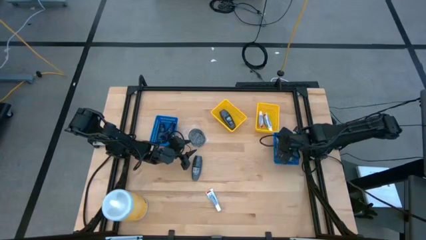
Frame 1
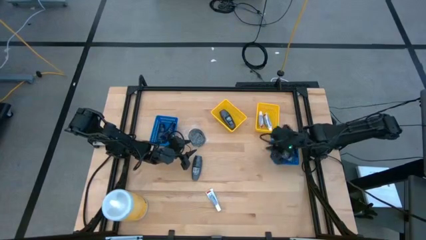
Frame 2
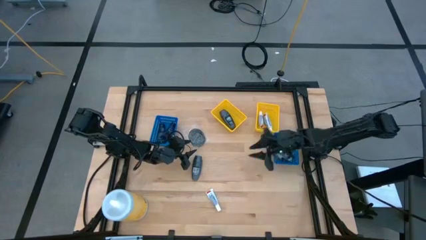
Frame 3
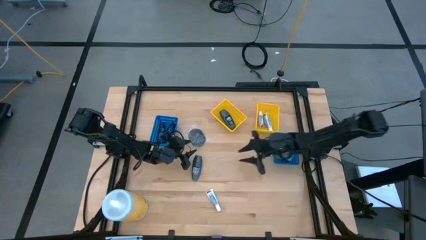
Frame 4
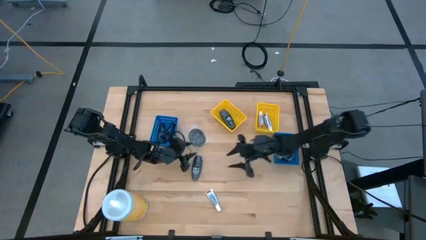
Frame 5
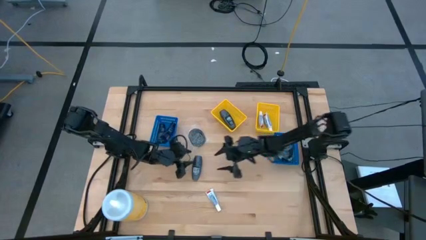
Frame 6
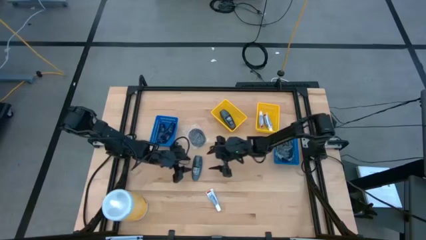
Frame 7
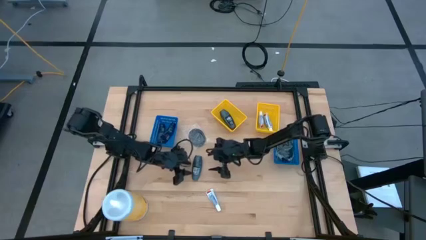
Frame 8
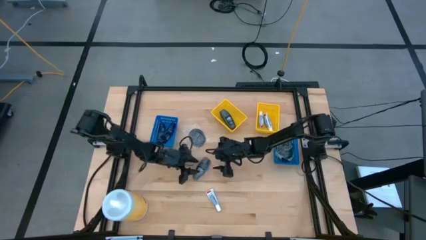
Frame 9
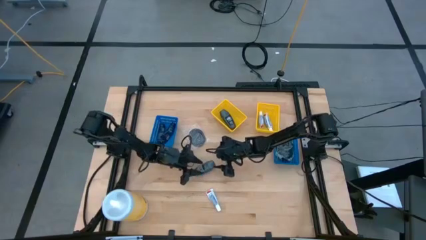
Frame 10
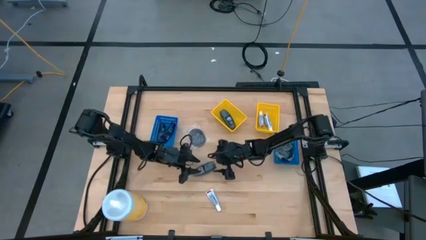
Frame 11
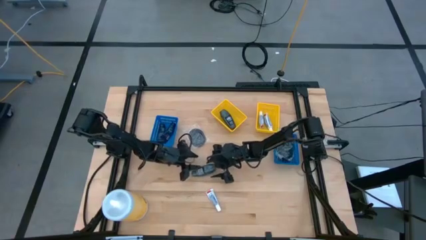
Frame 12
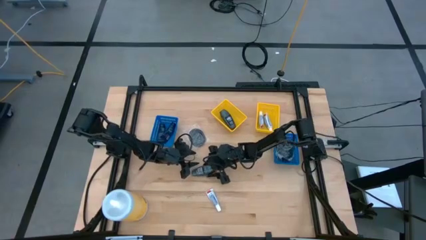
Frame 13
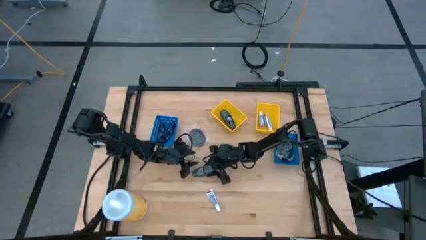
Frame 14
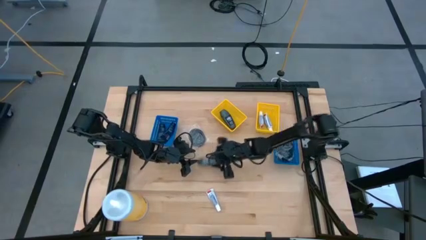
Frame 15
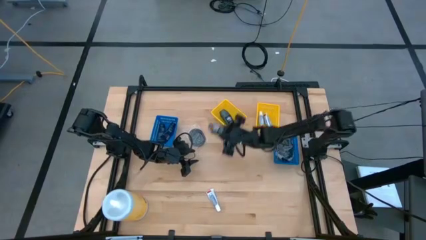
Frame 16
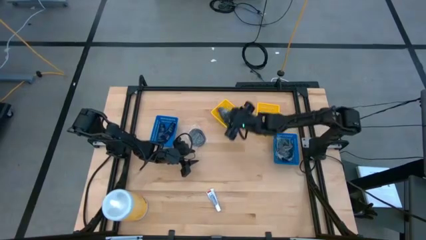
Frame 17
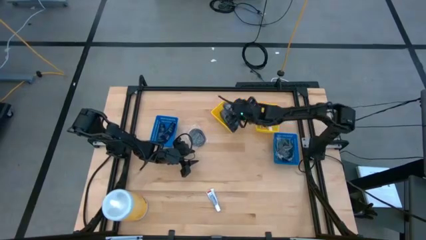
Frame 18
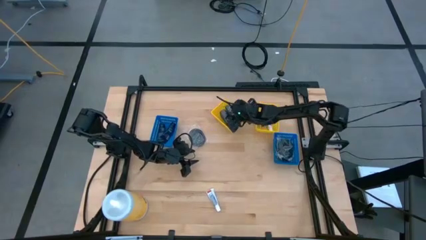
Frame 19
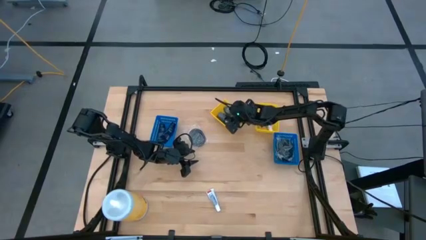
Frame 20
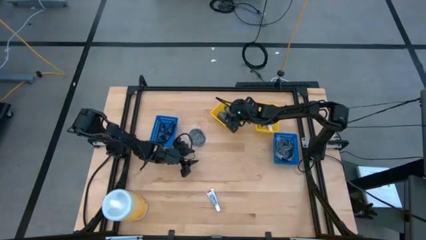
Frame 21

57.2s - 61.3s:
Task: Pick & Place Travel size toiletries
Put the black deodorant into the left yellow bin

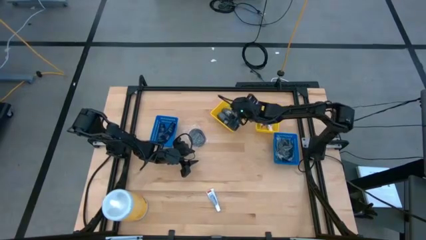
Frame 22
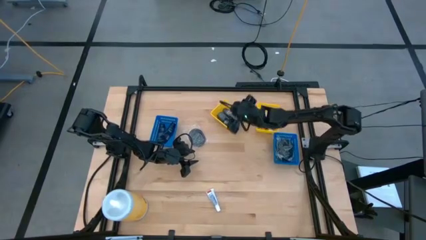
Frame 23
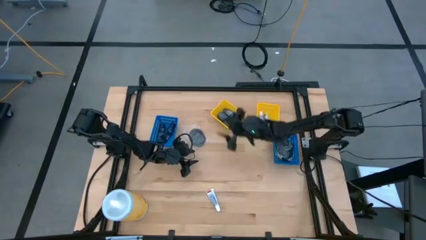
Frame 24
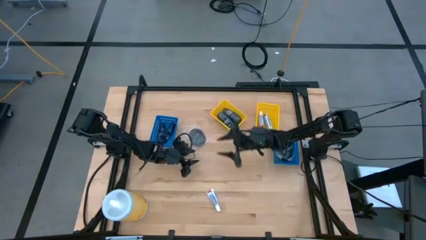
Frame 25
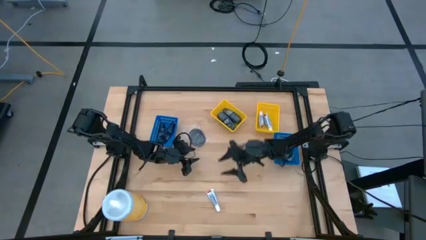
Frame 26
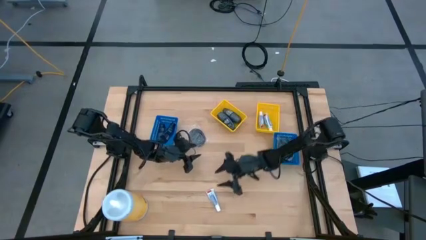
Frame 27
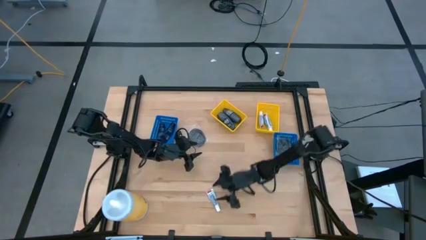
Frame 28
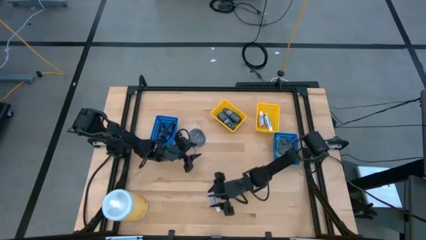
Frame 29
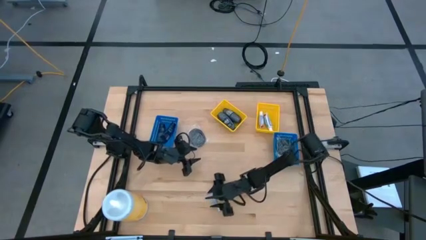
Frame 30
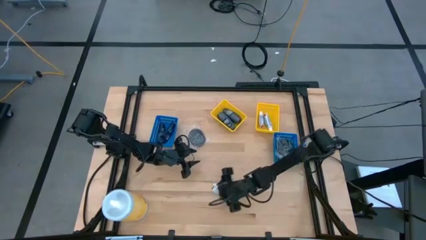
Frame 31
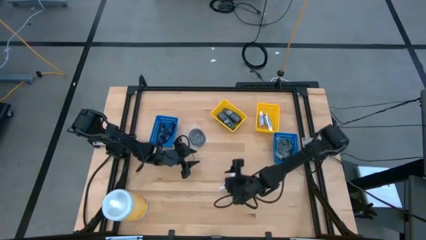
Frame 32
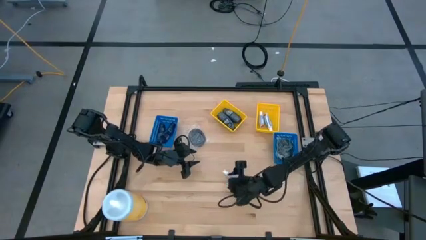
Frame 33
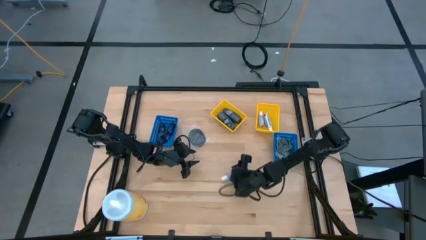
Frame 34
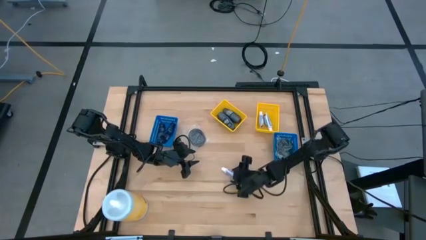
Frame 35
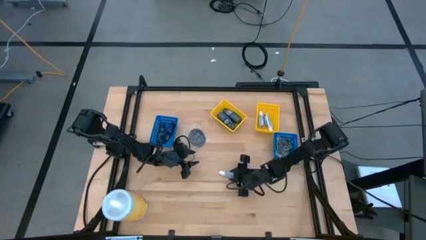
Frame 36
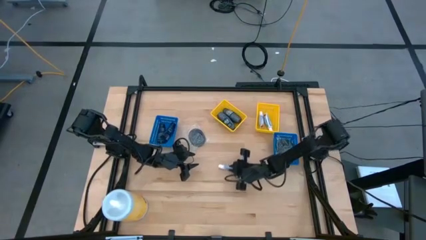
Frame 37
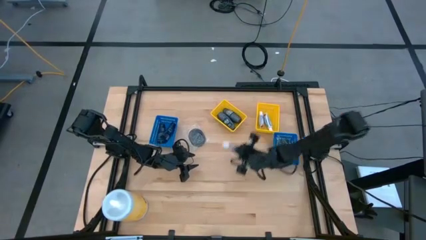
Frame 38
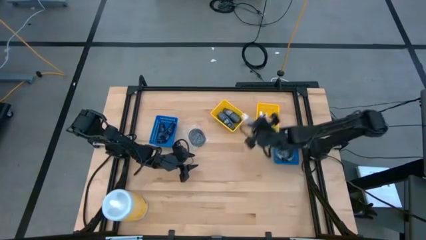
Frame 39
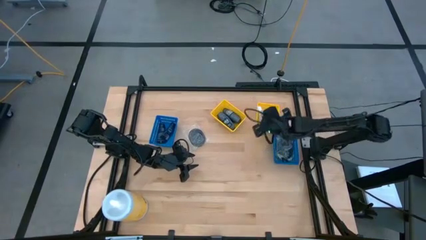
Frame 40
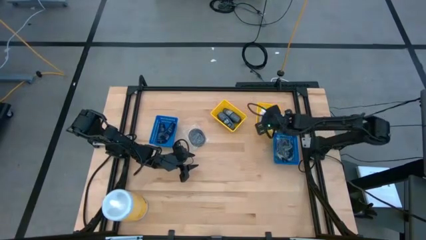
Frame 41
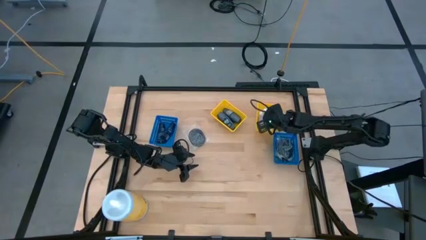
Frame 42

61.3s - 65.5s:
Put the white toothpaste into the right yellow bin

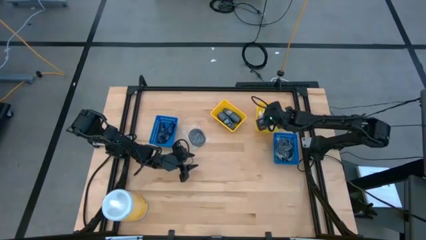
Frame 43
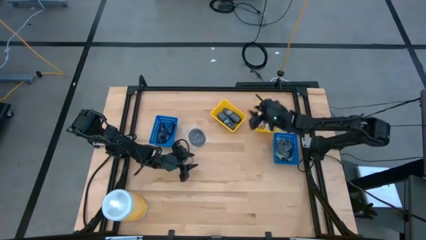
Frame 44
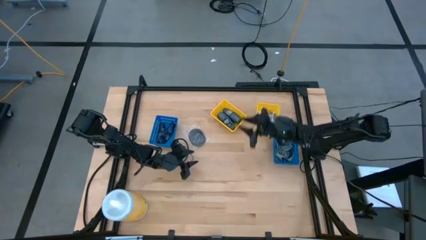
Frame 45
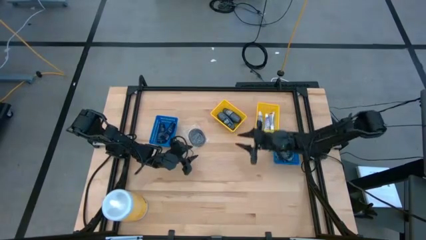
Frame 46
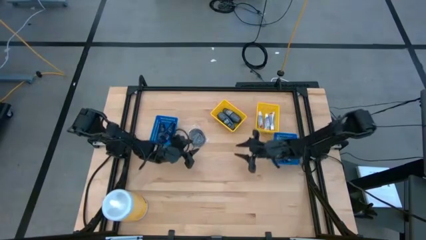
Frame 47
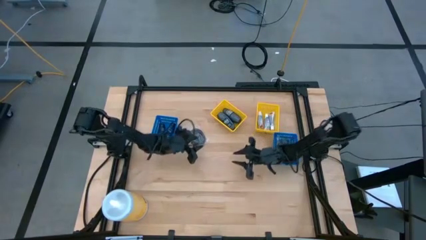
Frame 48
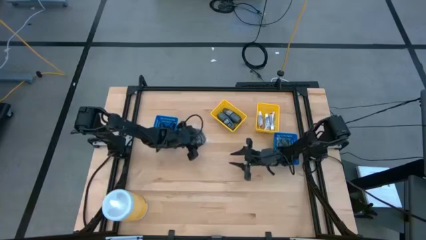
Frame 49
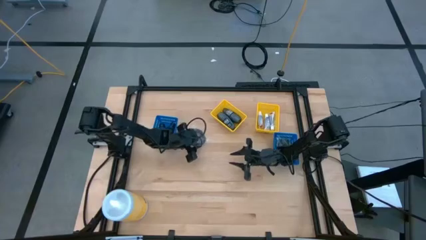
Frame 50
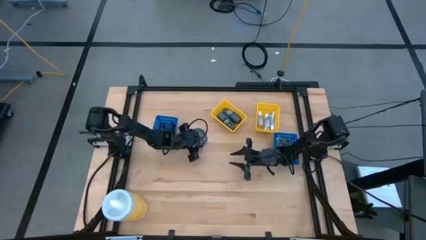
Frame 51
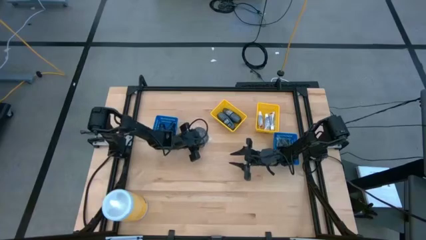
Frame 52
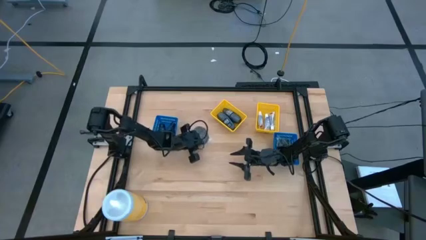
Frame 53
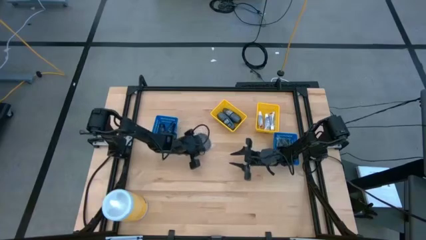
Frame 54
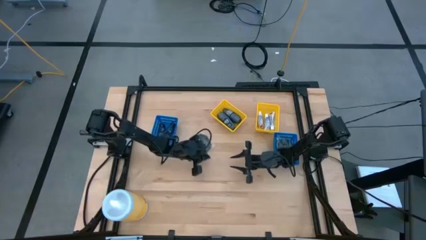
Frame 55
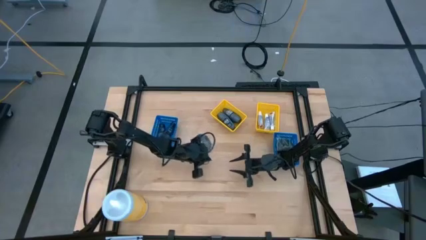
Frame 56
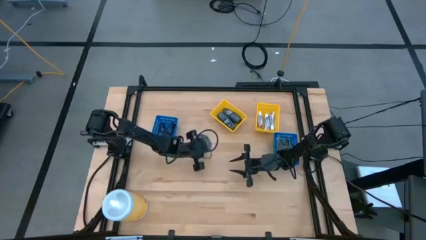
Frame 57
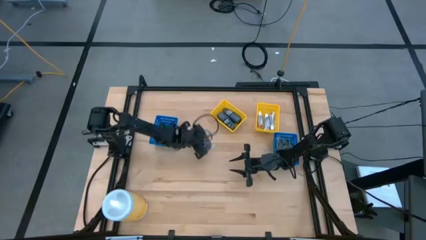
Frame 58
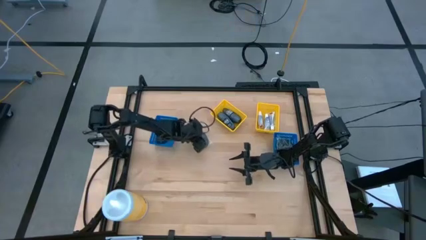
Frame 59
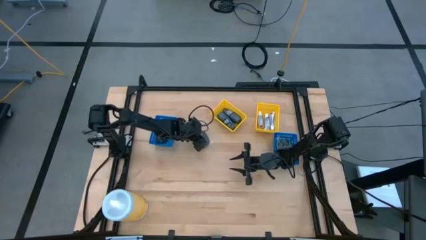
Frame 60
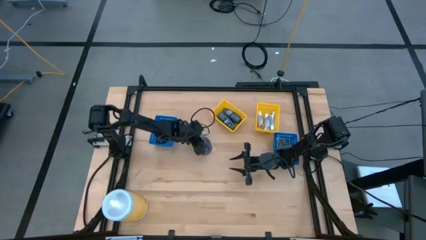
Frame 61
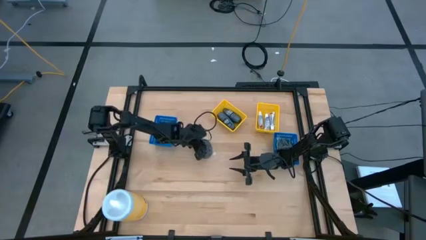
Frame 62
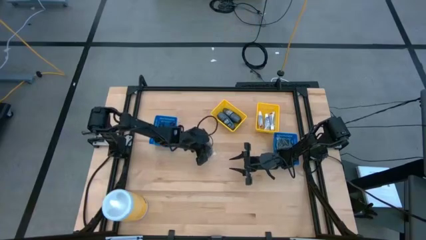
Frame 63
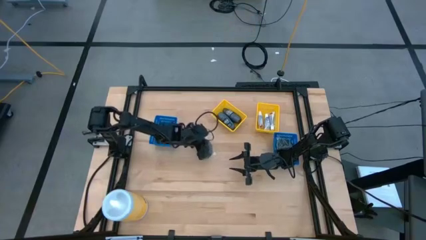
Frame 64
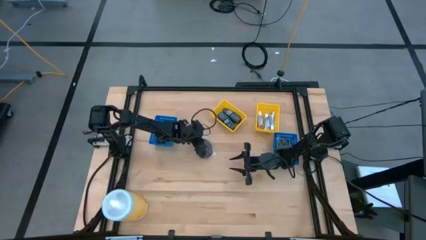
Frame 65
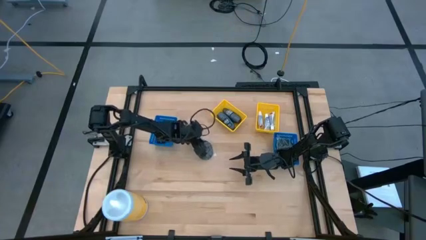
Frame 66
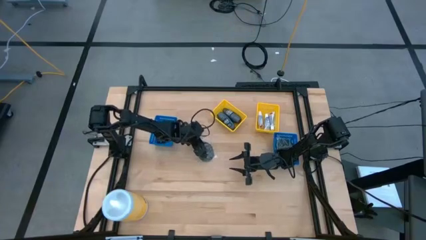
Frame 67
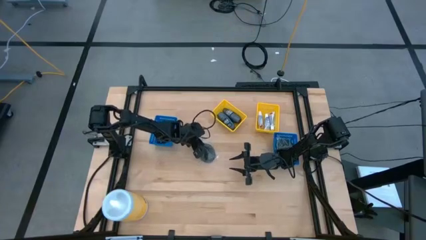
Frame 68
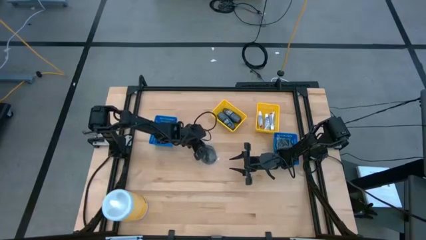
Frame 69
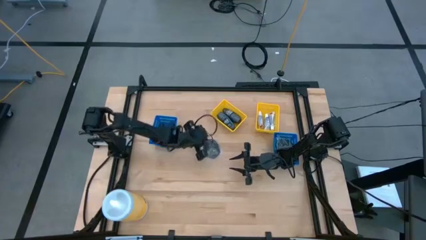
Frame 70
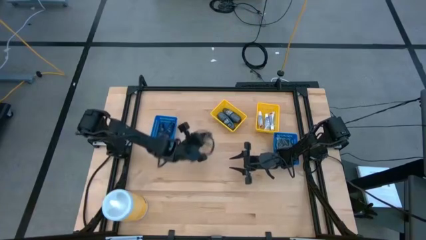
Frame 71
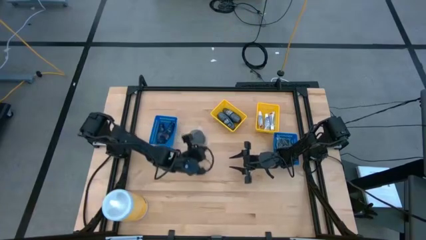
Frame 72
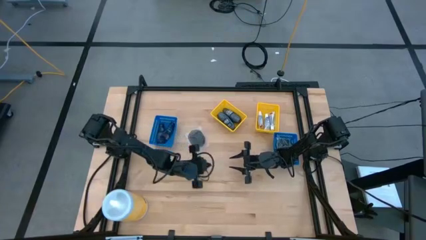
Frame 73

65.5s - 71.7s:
Put the black hairbrush into the right blue bin

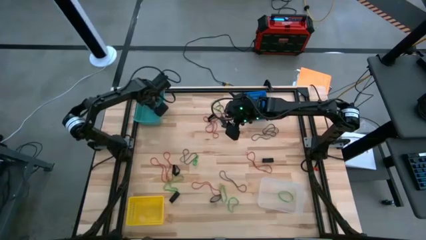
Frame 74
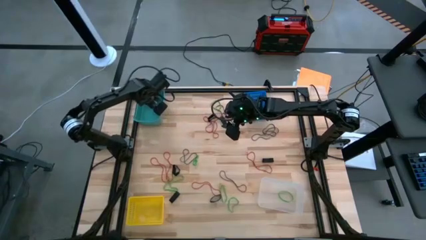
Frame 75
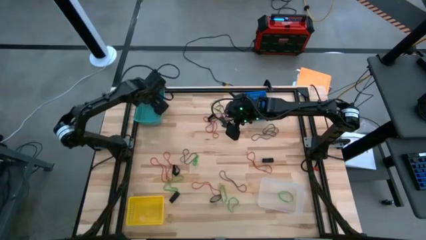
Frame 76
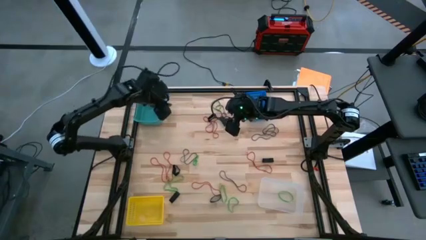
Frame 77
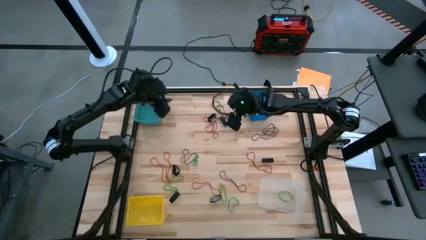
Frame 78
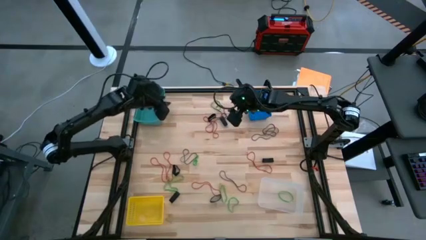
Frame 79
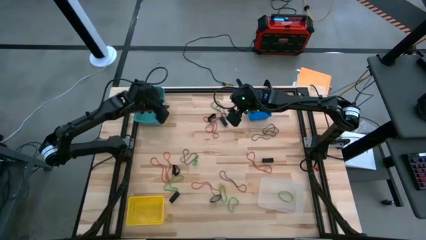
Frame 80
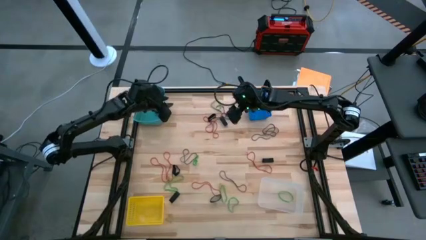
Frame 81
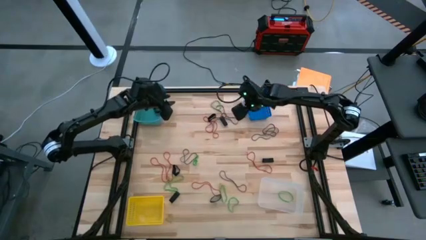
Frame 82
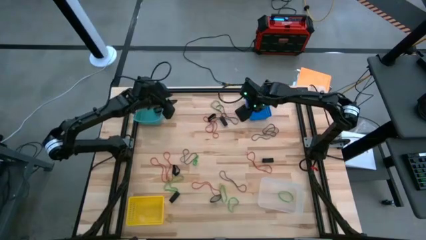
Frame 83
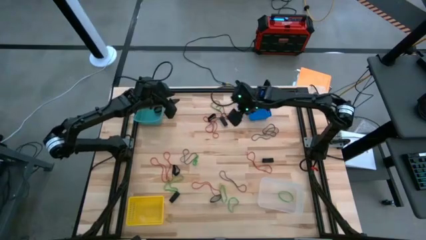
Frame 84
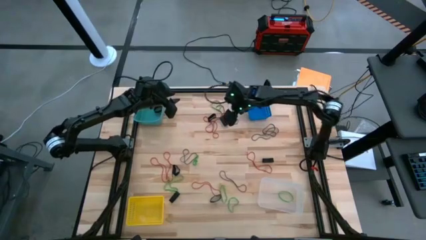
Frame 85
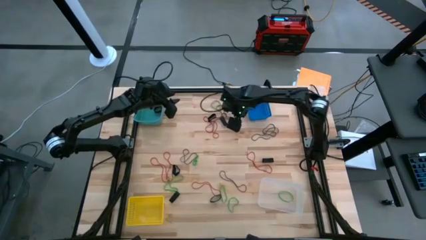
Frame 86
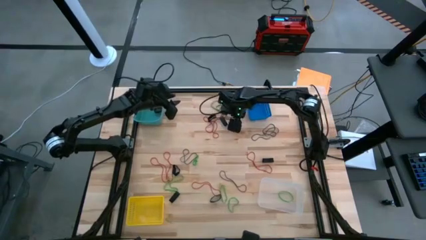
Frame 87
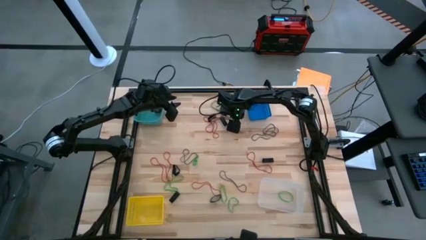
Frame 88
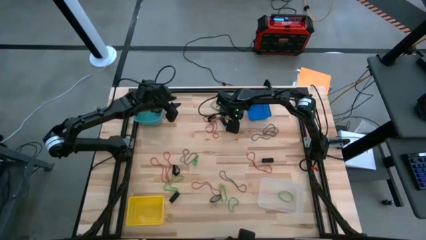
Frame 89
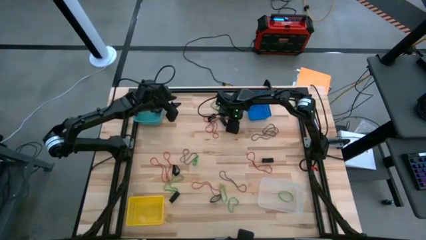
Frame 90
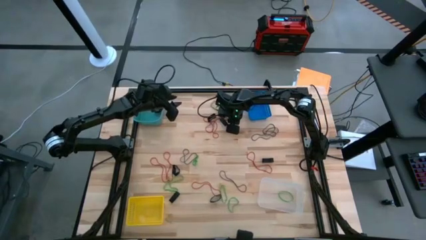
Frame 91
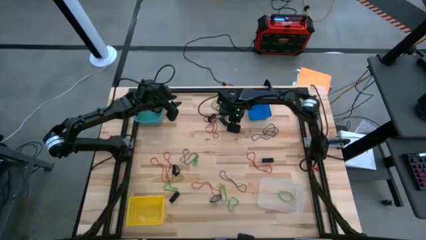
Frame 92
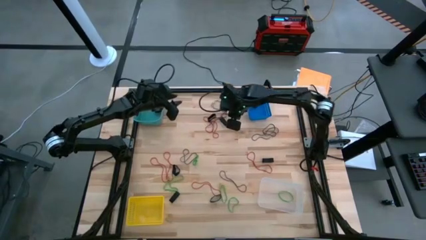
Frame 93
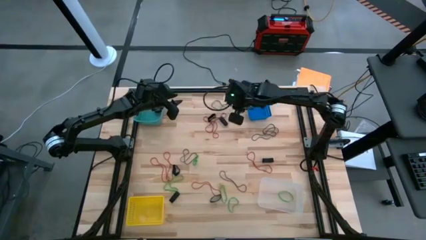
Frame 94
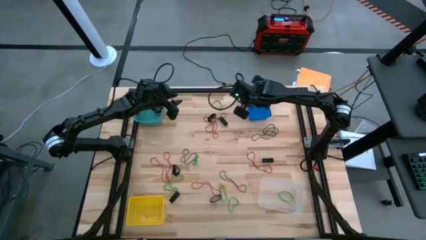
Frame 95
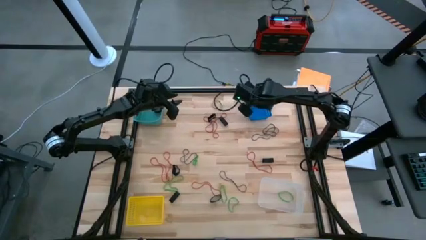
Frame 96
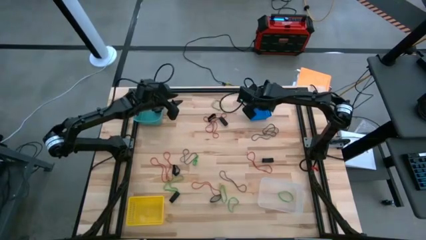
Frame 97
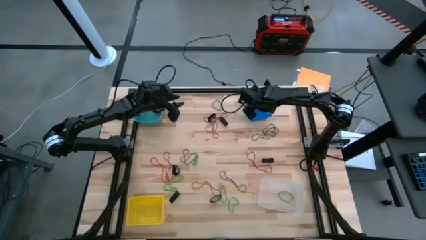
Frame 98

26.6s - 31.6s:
Task: Sort rubber bands into baskets
Put the thin black rubber band into the blue basket
